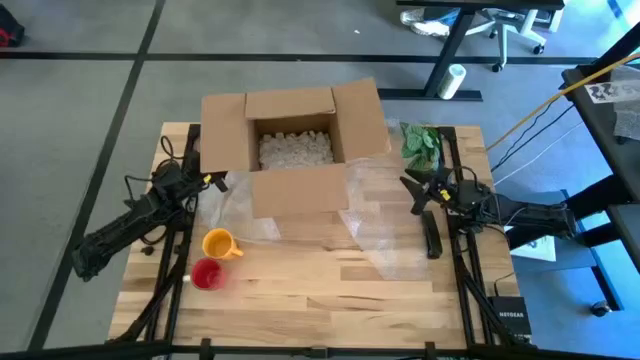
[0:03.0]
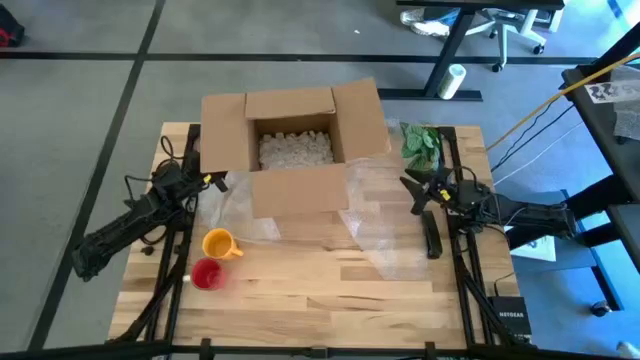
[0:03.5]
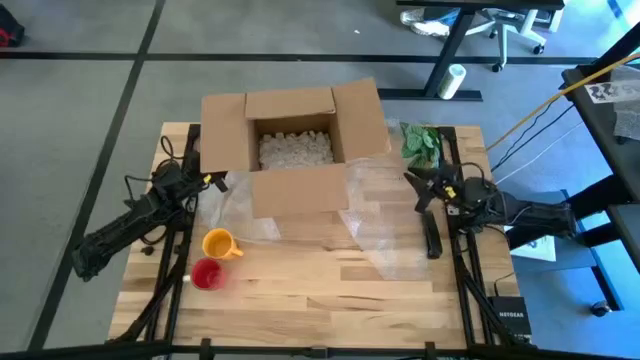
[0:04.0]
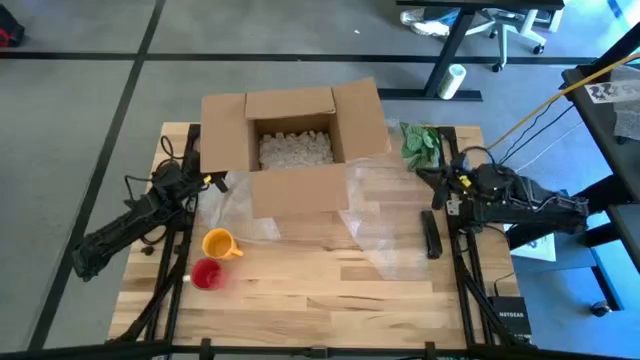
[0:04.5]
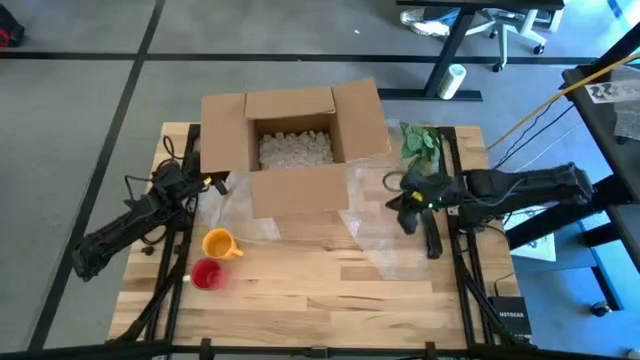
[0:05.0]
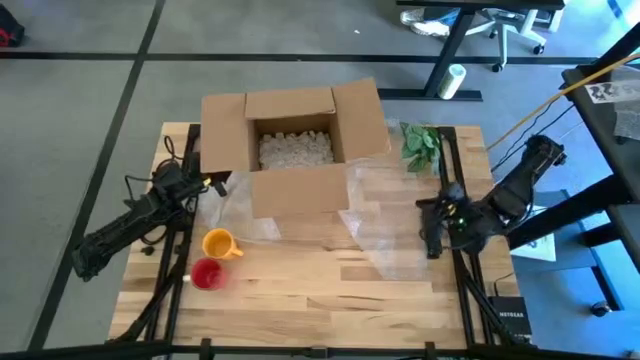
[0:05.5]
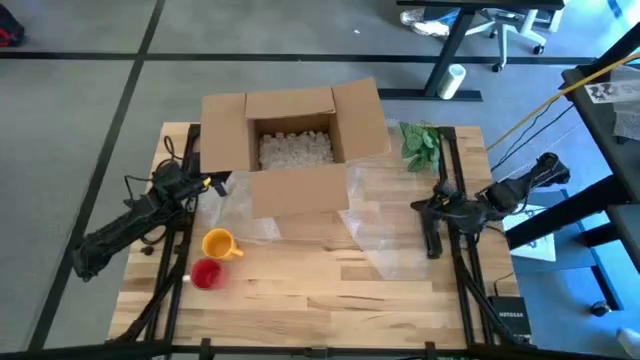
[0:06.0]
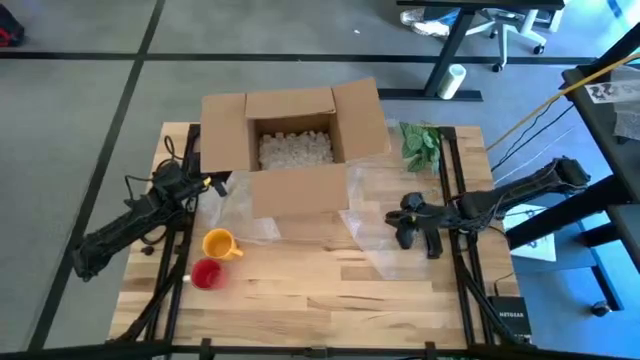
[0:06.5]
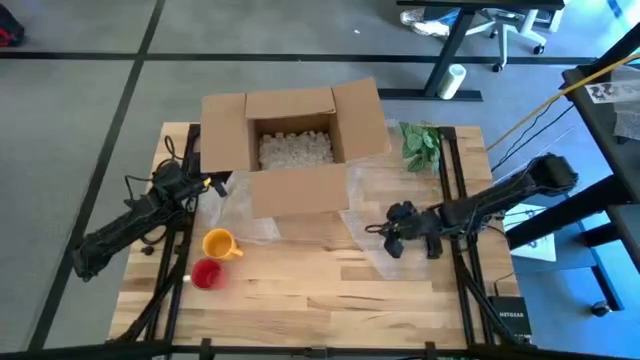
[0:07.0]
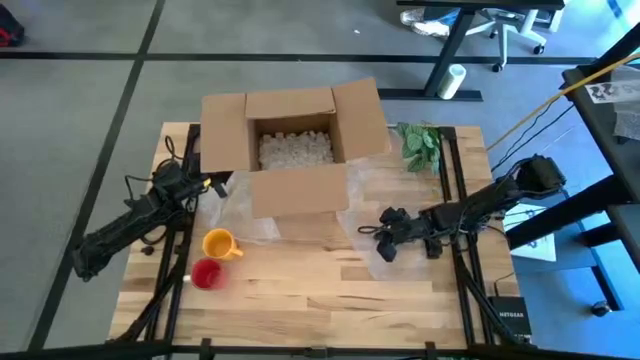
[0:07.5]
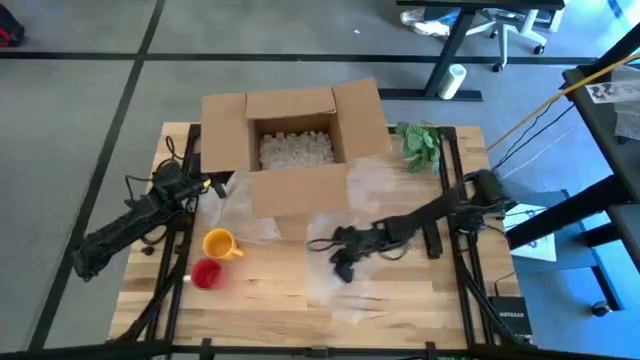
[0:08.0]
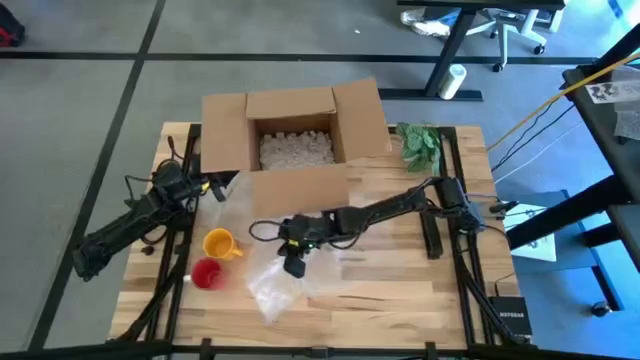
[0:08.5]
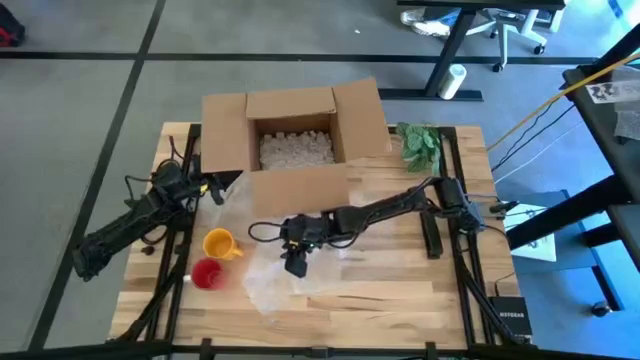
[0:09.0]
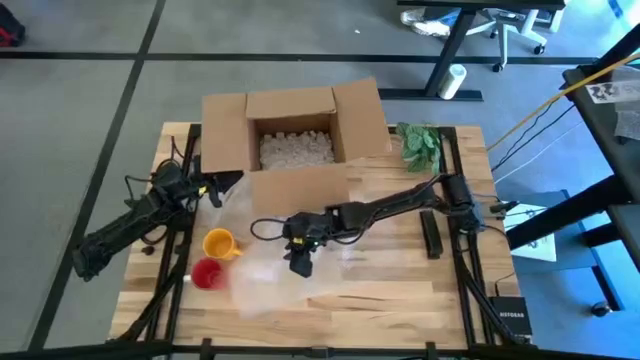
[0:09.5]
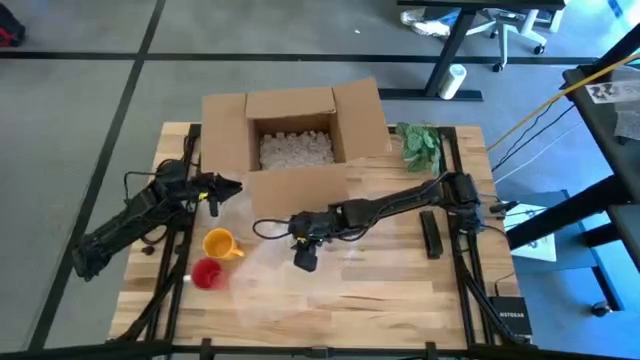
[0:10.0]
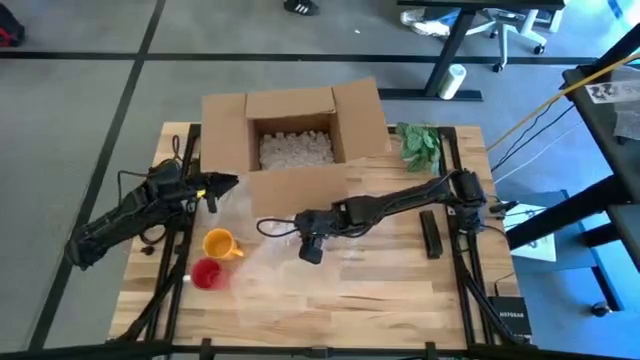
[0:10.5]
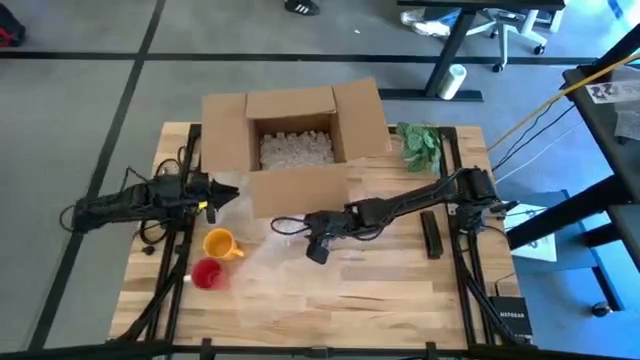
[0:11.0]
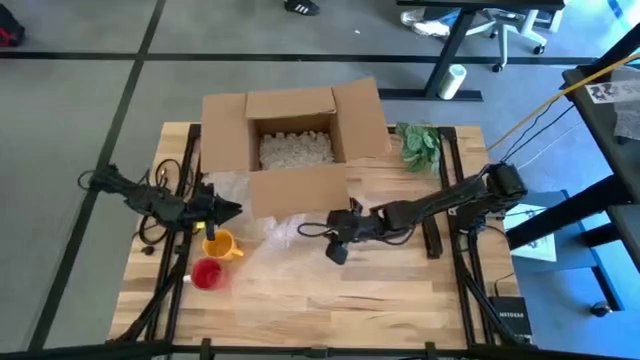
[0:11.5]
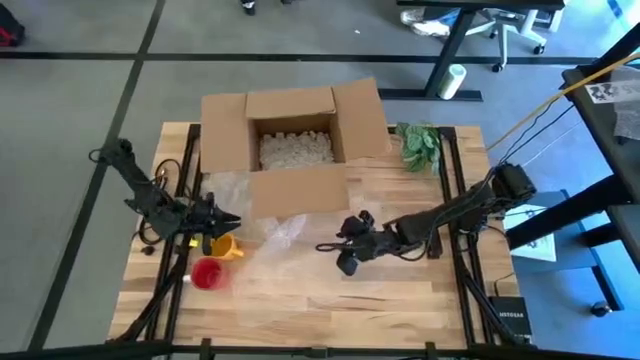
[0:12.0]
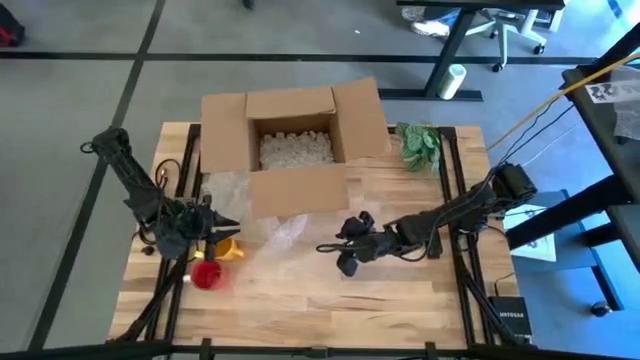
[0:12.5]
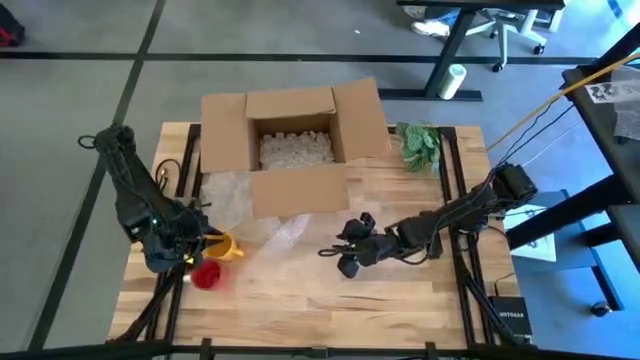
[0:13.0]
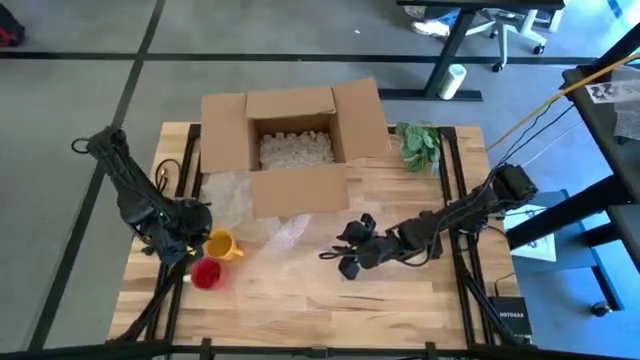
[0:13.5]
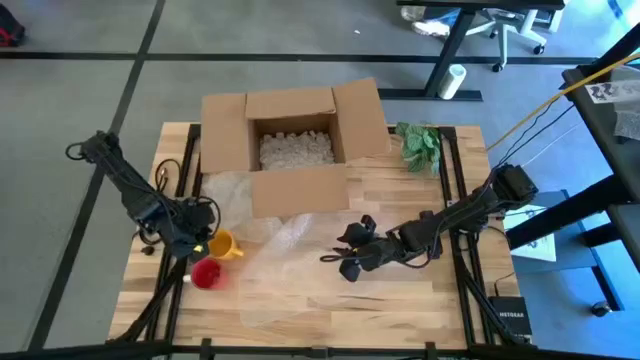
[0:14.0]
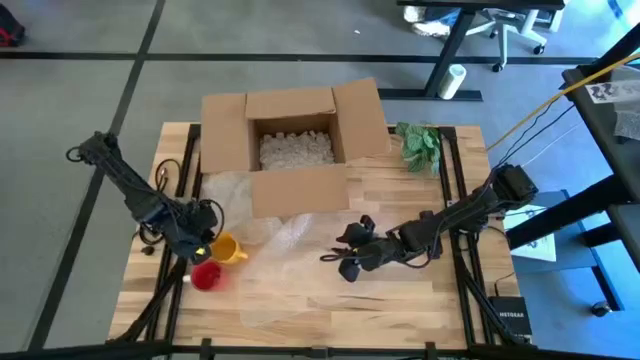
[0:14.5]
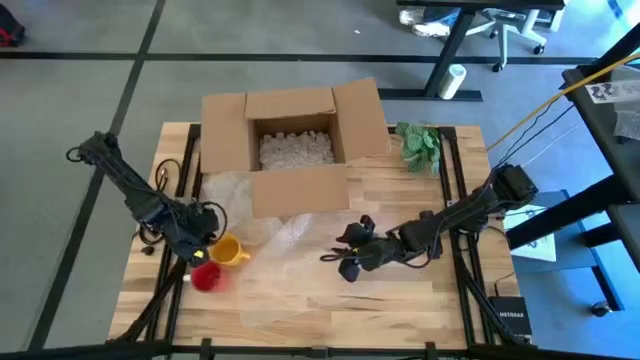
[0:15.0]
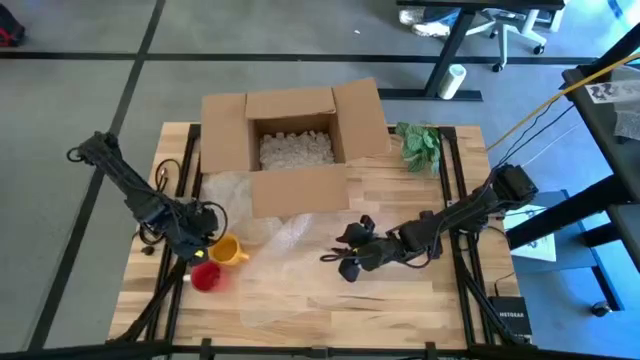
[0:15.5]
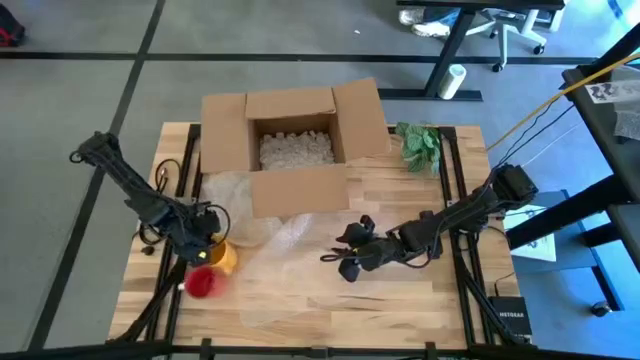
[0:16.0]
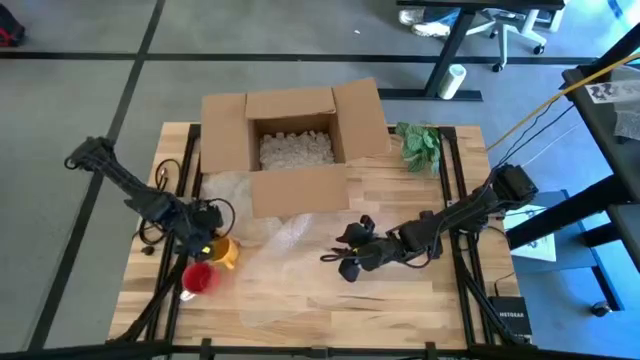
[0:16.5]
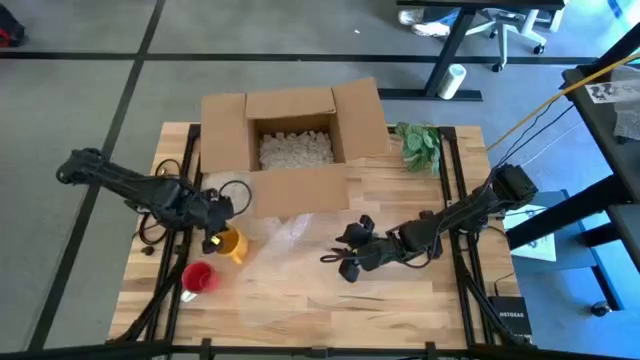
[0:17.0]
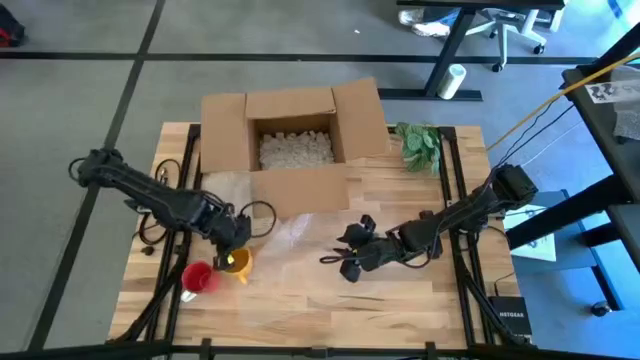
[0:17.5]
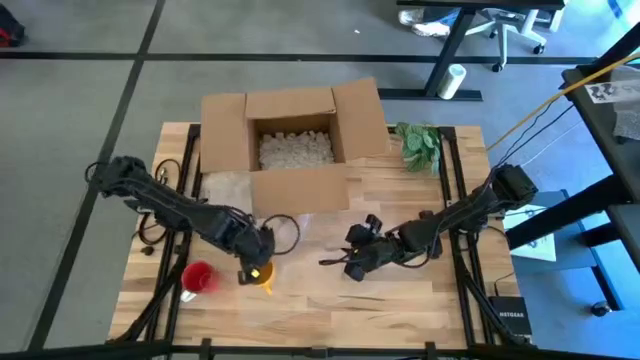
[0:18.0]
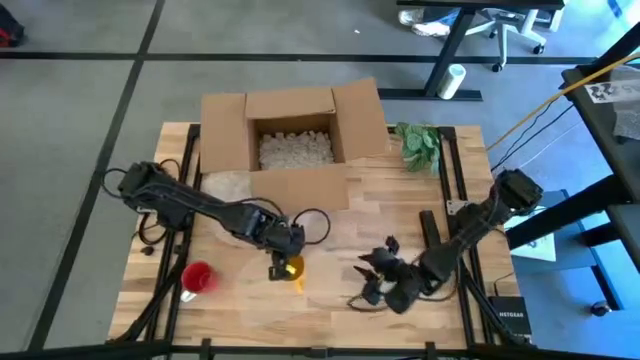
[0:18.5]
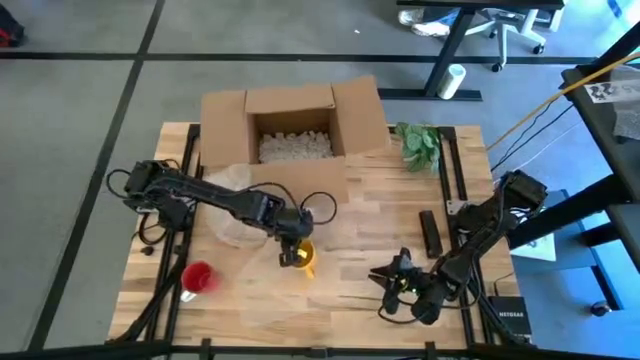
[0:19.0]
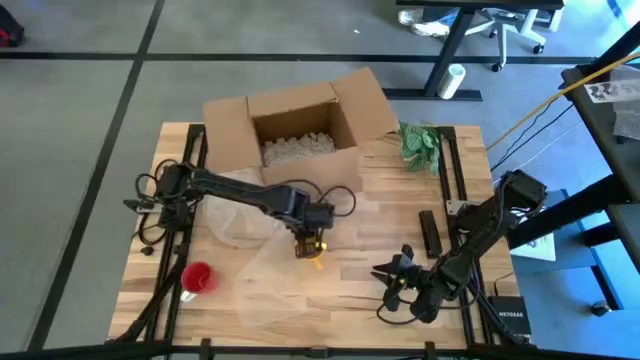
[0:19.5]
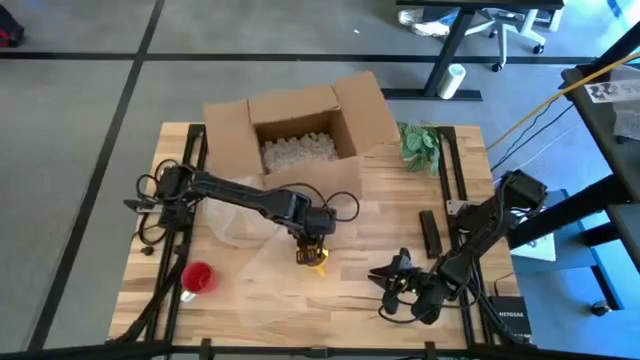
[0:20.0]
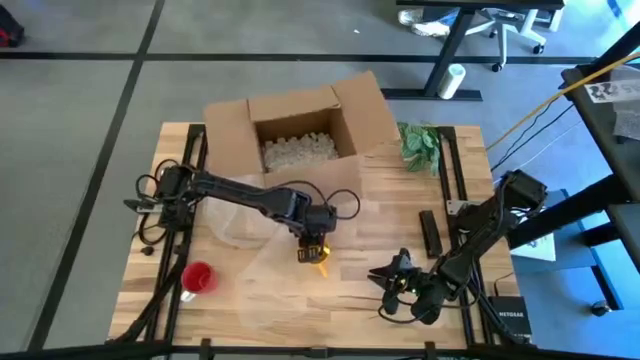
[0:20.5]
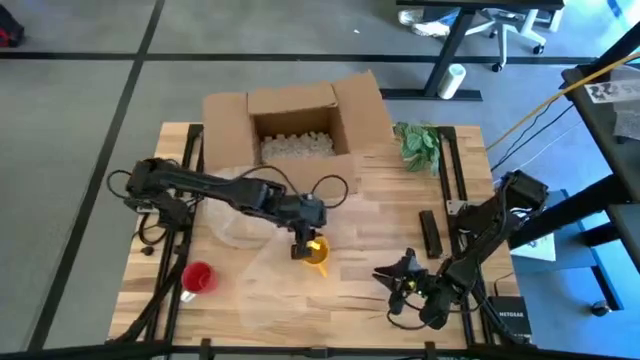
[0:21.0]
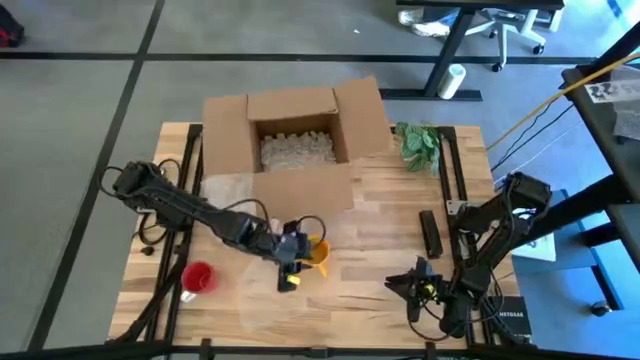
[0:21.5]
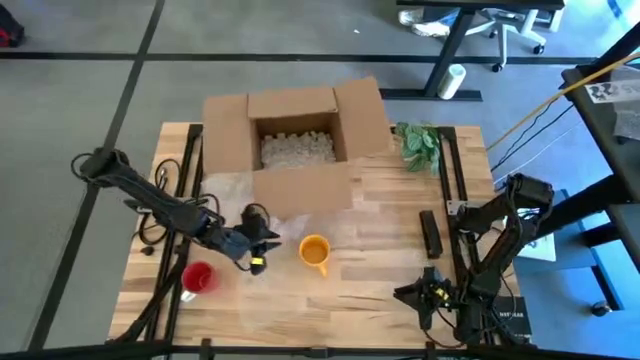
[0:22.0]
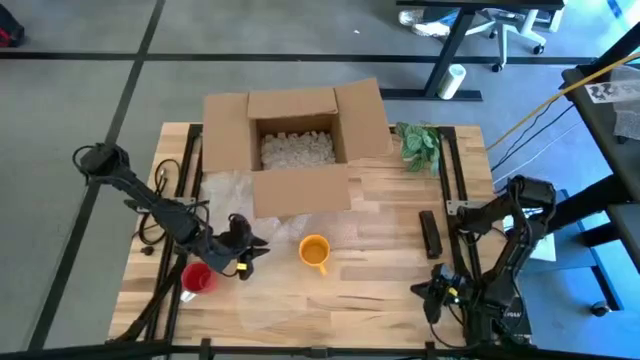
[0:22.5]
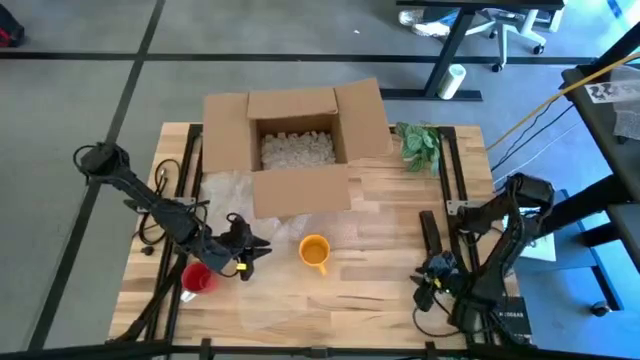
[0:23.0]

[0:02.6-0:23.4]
Task: wrap mug
Wrap the yellow mug with the right transparent bubble wrap
